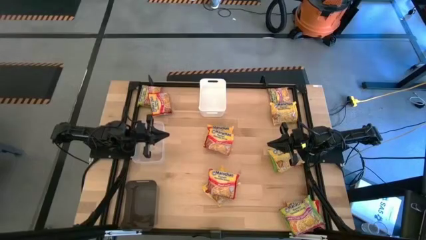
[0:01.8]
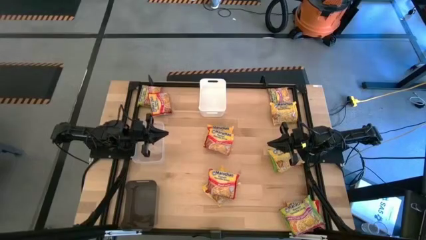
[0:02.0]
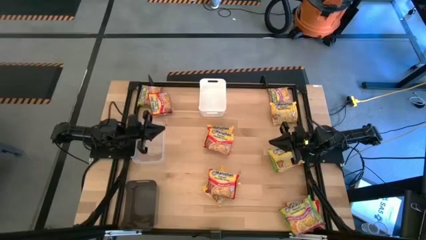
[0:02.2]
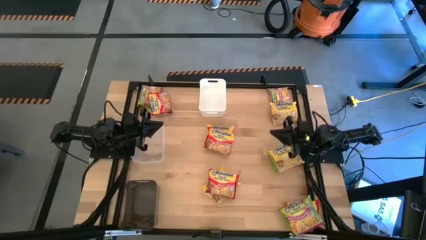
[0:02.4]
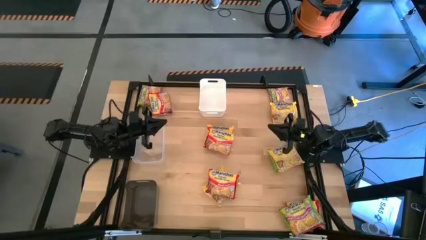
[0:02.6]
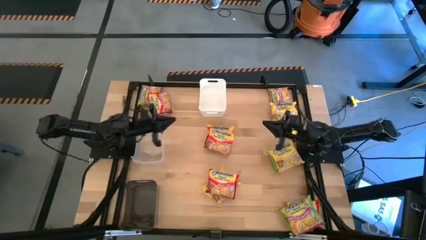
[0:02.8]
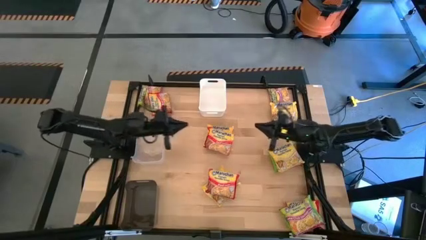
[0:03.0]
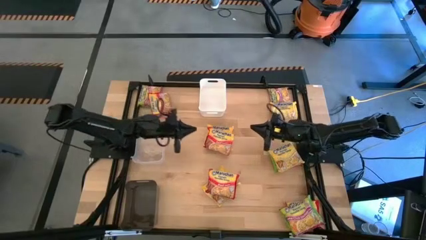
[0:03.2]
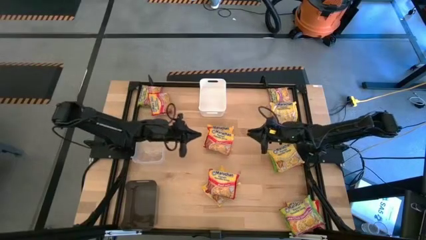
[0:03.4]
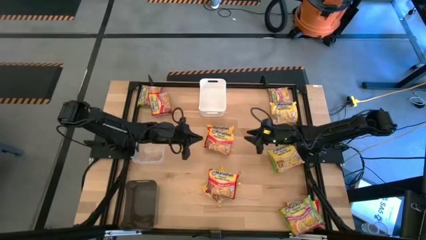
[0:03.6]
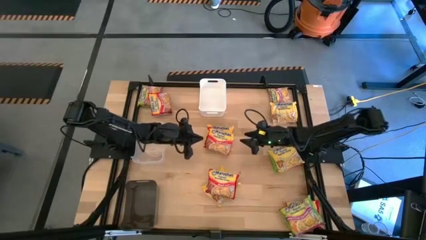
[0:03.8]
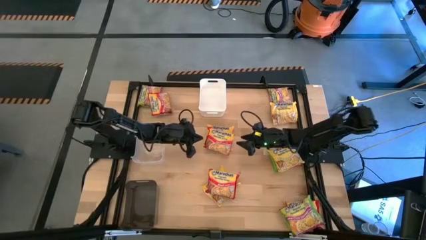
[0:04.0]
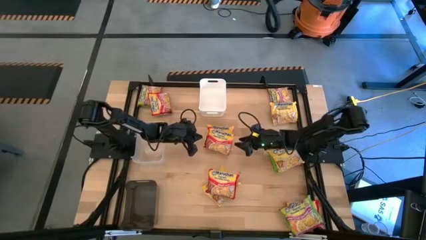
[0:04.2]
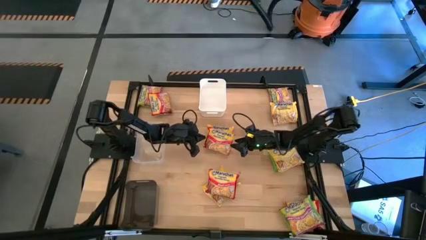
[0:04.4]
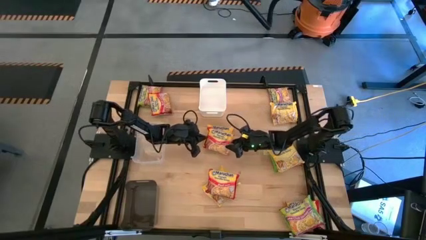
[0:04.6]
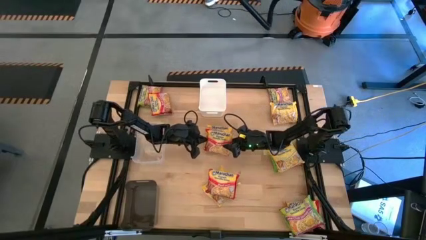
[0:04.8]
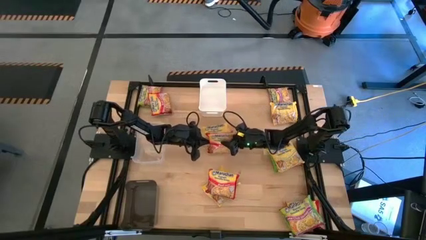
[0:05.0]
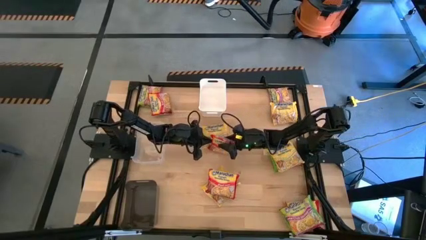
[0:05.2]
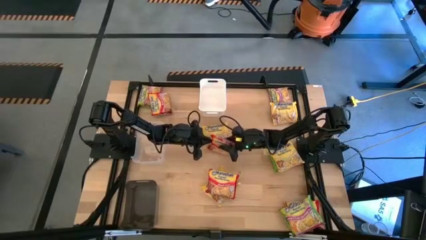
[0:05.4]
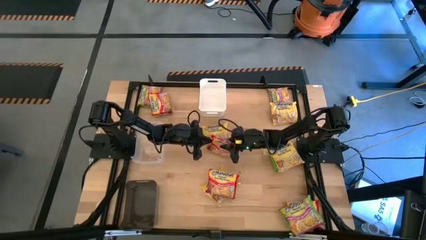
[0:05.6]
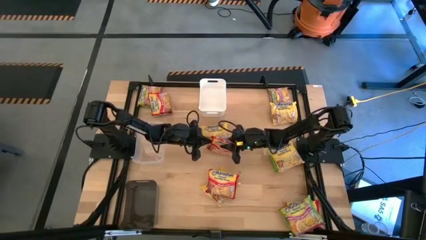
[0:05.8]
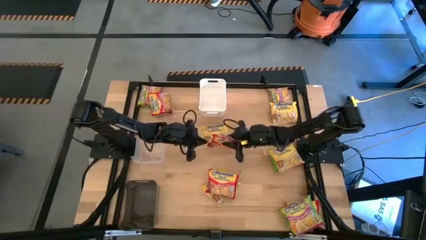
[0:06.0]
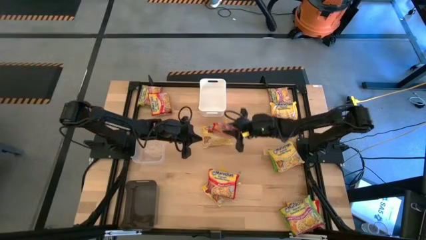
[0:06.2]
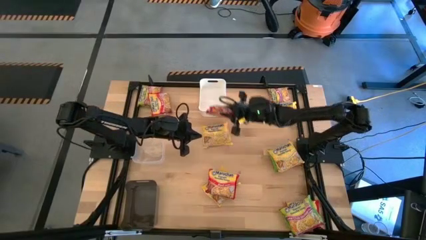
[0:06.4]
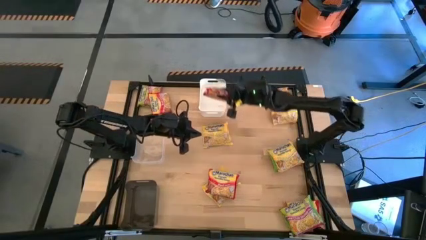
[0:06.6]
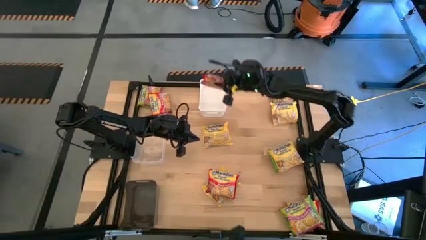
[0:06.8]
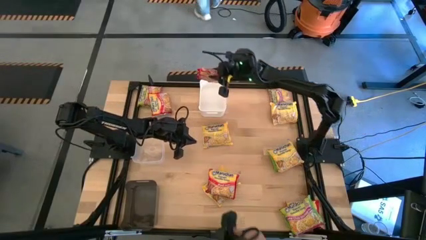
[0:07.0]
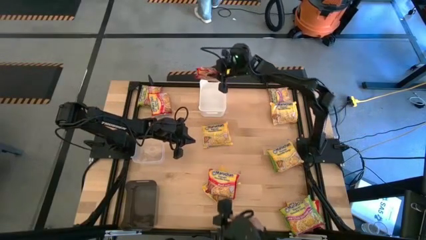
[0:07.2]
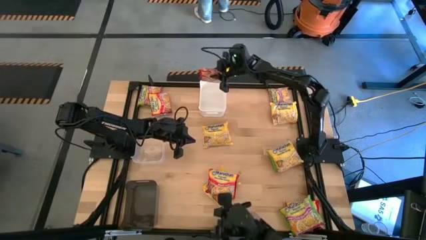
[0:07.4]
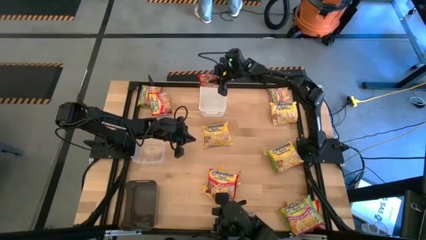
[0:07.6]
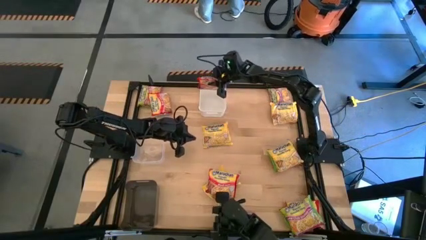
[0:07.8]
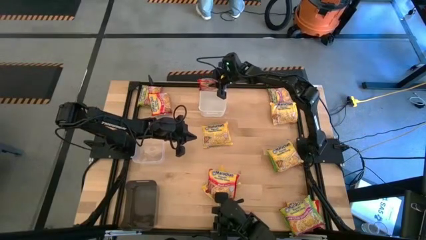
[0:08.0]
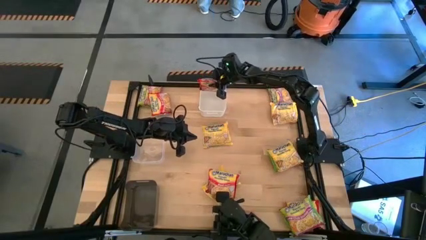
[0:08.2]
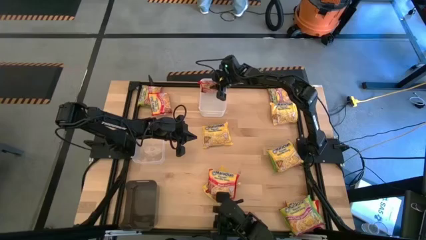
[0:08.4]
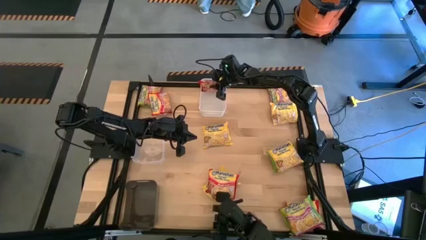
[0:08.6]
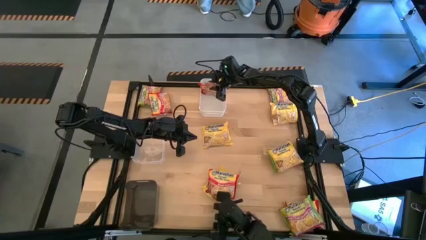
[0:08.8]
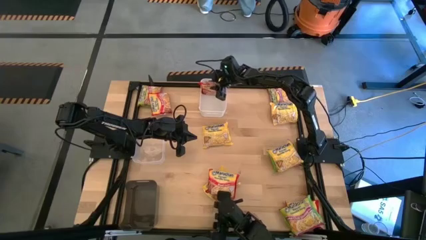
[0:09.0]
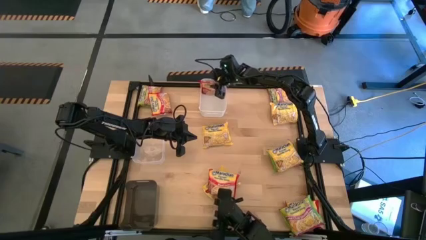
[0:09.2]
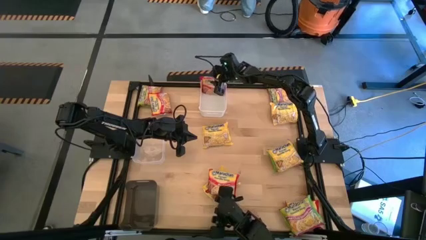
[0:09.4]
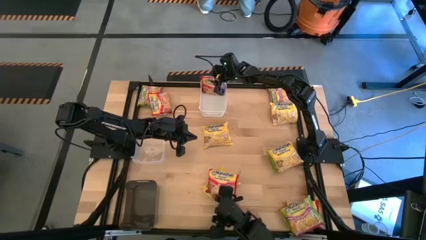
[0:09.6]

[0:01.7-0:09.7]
Task: Sort Maruchan noodles
Put the red noodle pack into the white bin

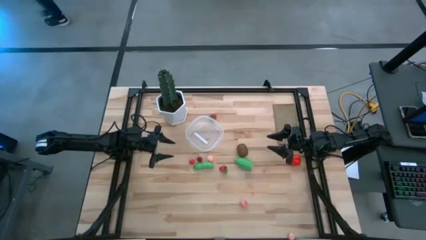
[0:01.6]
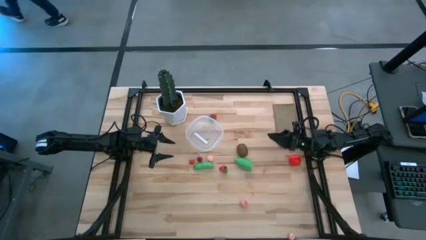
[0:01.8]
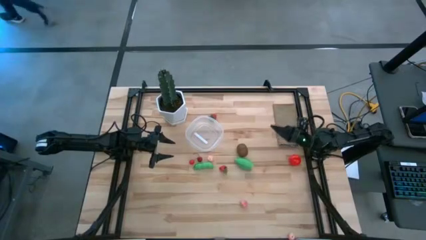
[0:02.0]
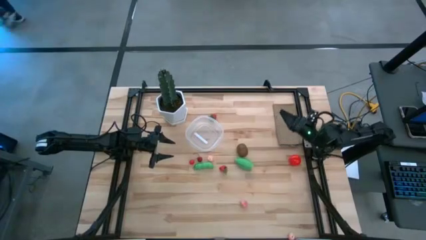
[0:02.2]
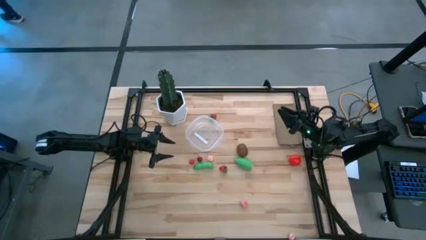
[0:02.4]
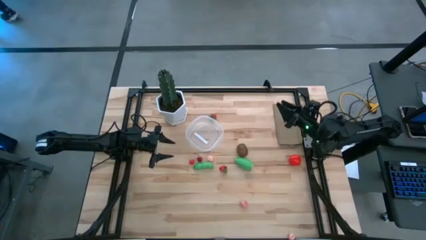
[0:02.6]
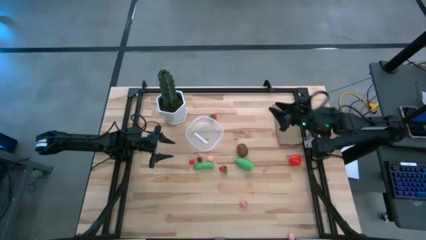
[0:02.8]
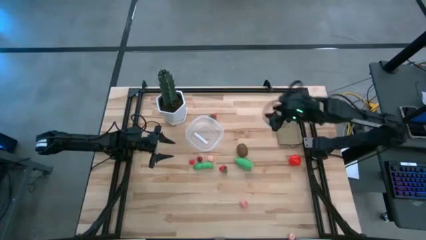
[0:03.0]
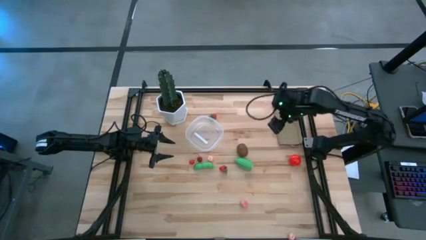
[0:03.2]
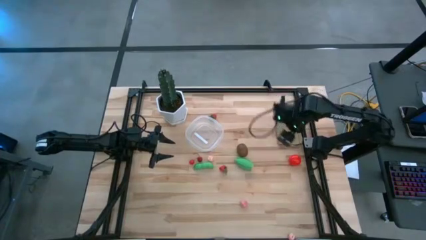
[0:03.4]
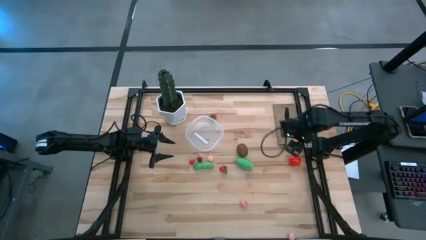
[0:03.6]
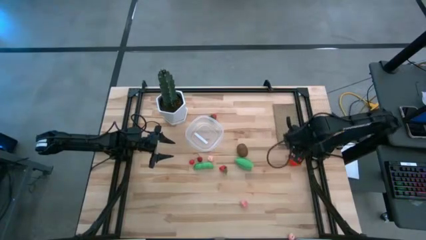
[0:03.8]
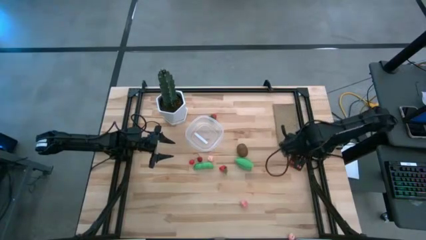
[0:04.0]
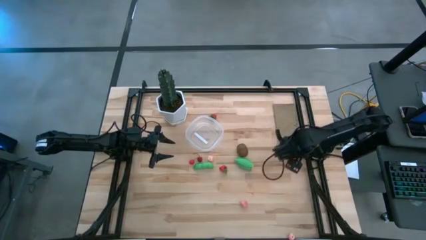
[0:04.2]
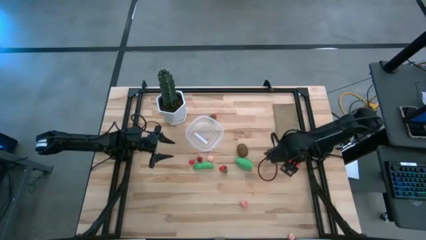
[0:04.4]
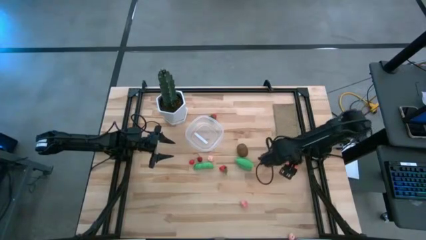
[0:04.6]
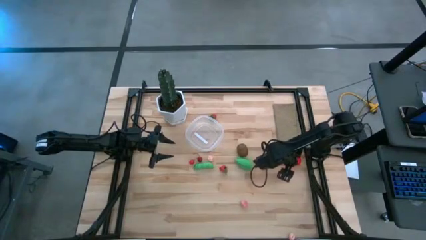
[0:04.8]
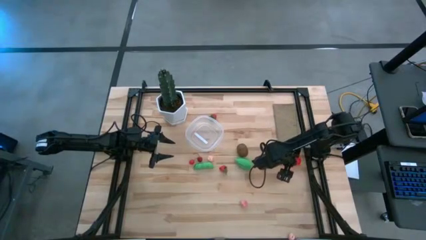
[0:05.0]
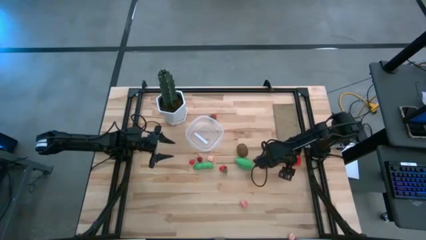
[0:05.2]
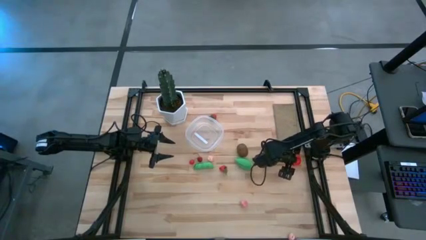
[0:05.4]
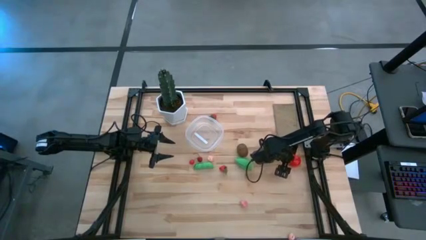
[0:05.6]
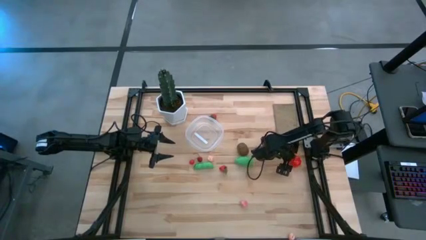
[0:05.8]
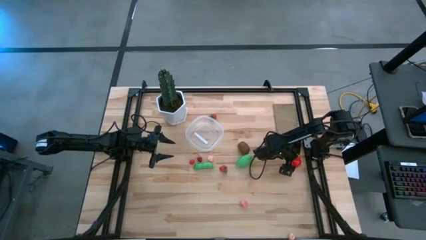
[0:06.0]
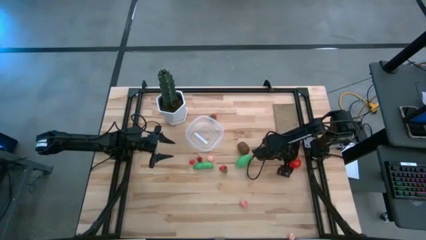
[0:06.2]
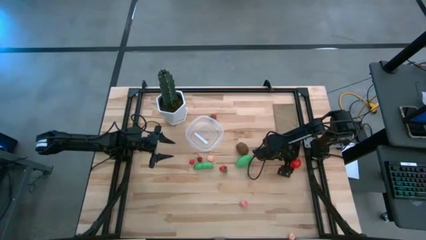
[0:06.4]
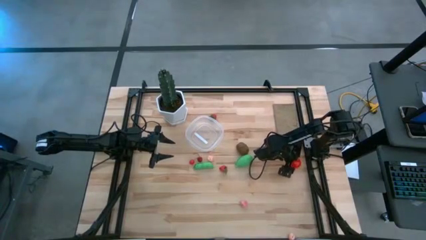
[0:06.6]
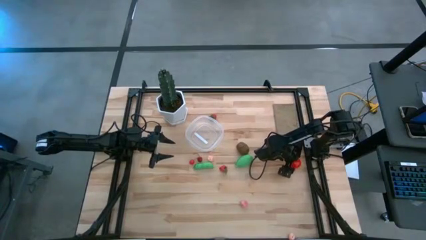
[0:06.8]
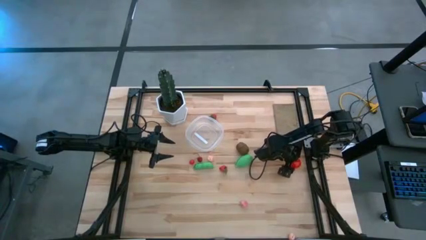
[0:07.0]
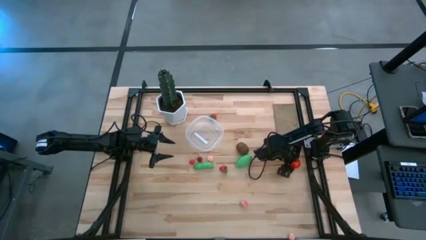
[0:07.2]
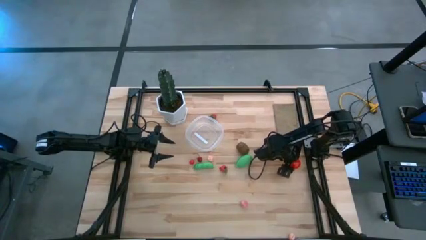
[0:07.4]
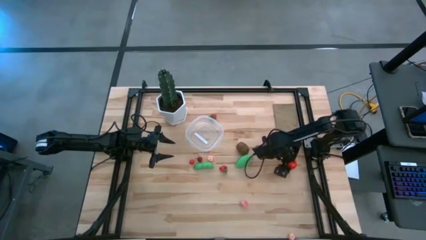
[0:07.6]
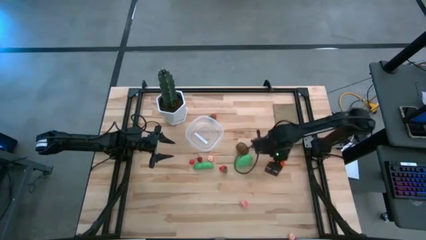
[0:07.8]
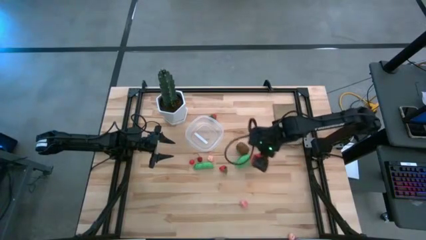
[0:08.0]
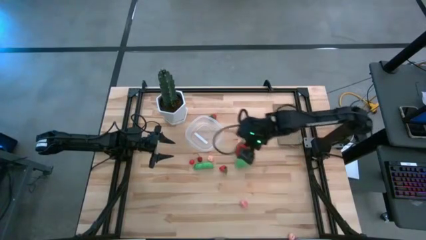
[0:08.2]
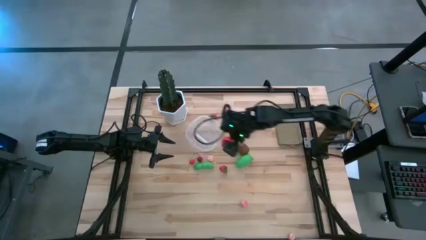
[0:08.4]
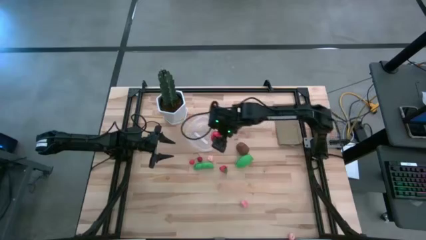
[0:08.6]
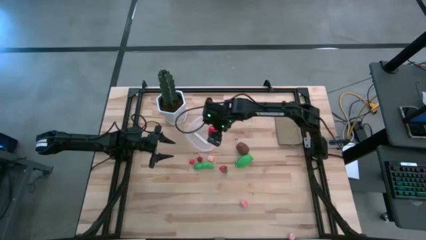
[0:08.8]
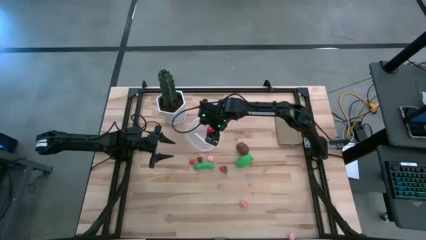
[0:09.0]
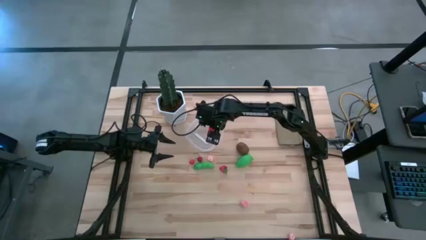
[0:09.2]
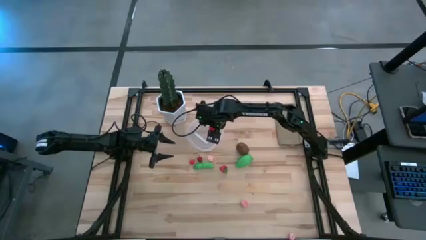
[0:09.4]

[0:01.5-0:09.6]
Task: Pick and placing Produce into tupperware
Put the tomato into the transparent bin
